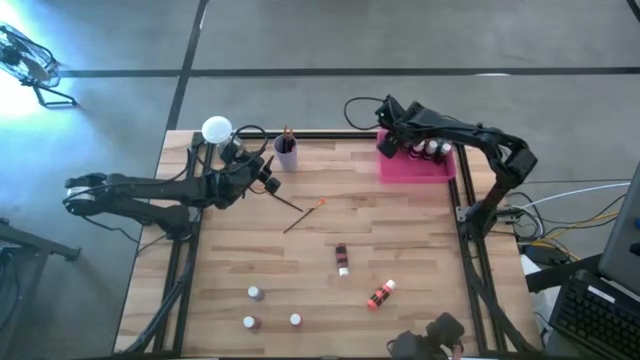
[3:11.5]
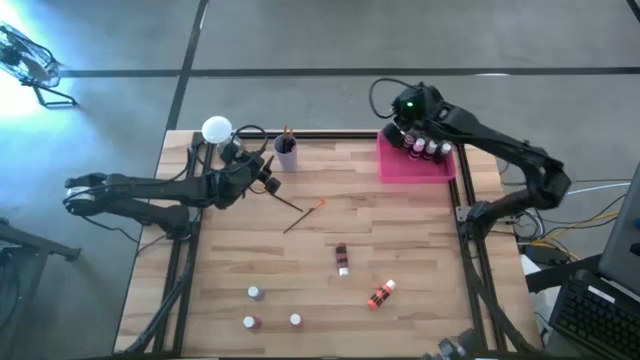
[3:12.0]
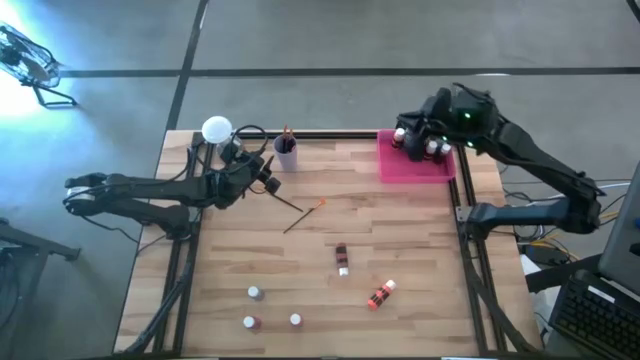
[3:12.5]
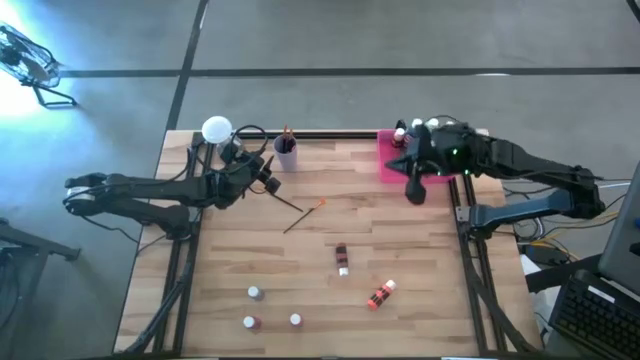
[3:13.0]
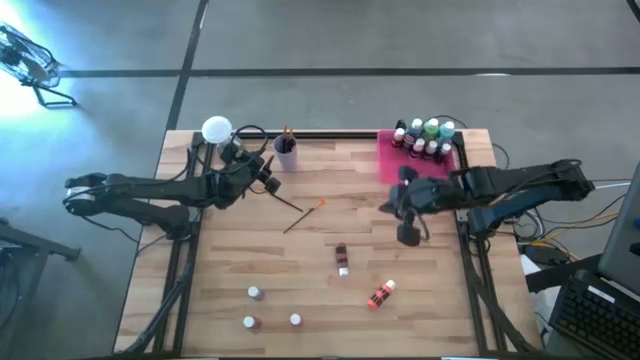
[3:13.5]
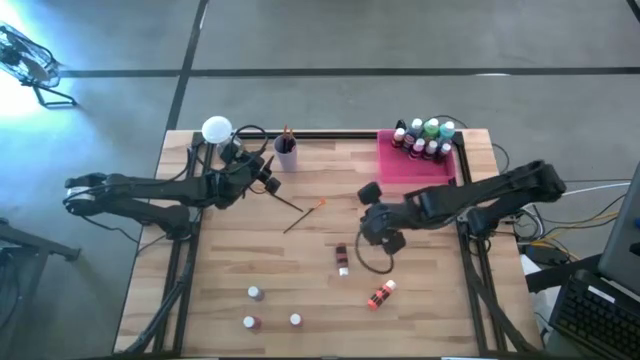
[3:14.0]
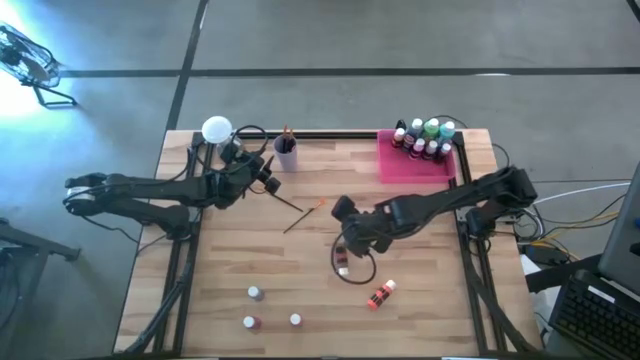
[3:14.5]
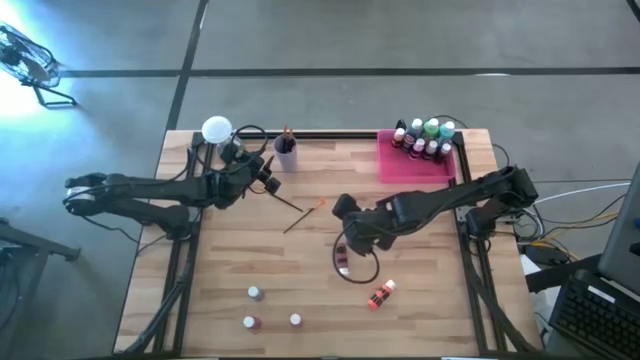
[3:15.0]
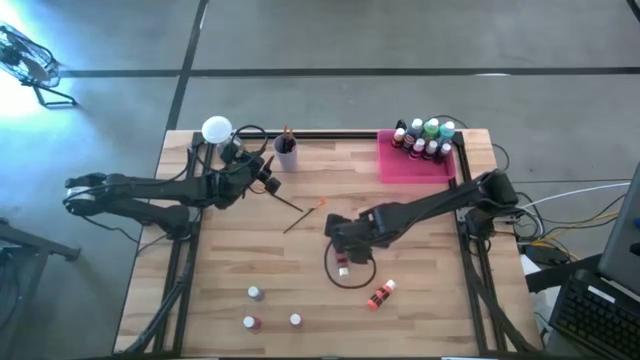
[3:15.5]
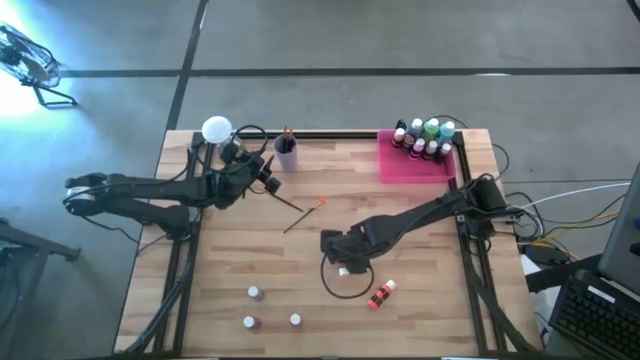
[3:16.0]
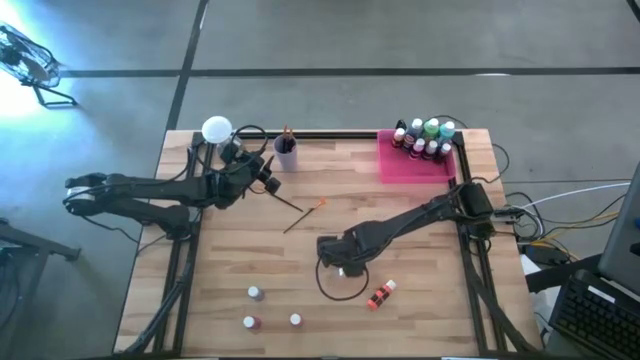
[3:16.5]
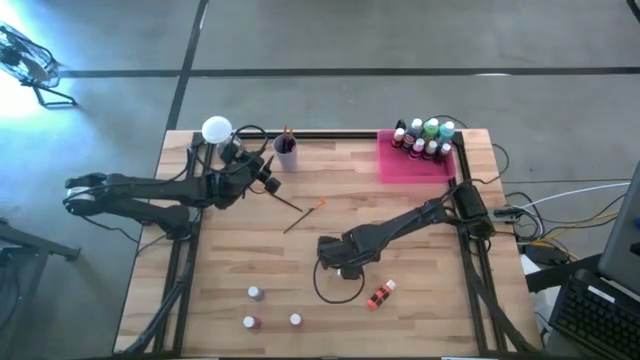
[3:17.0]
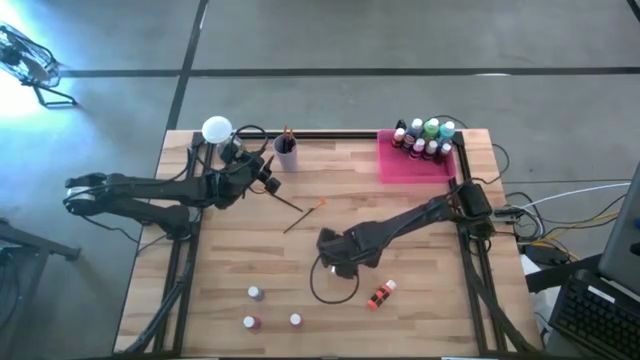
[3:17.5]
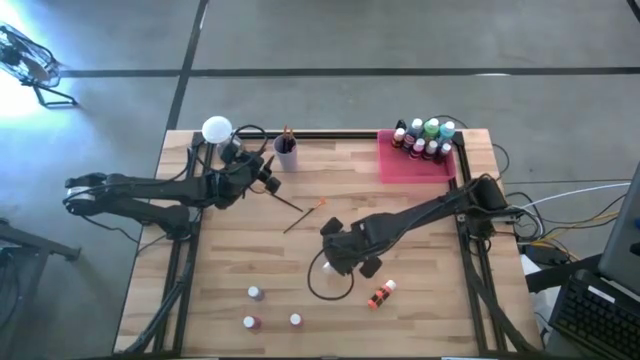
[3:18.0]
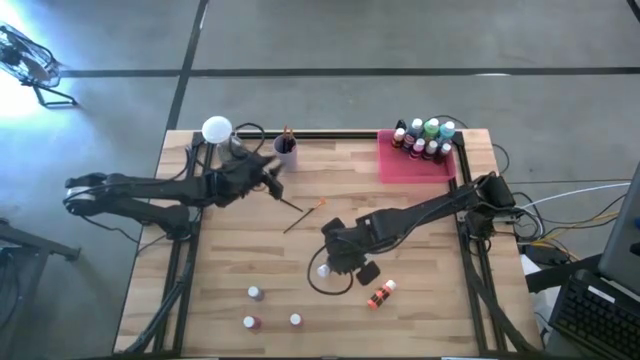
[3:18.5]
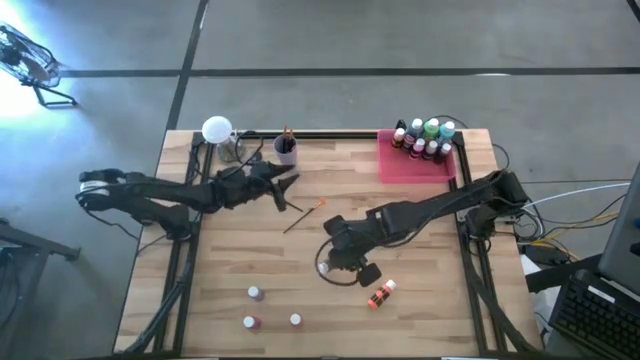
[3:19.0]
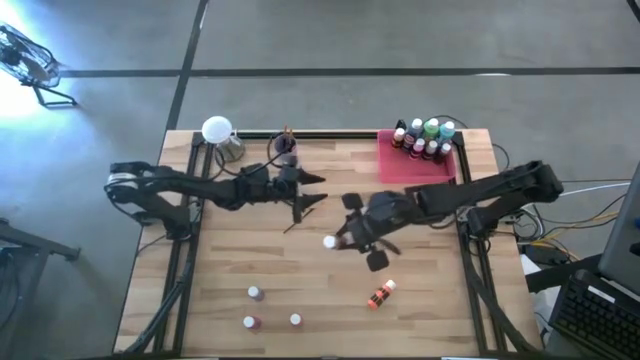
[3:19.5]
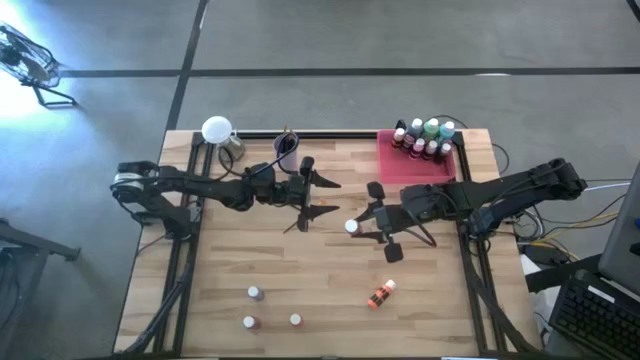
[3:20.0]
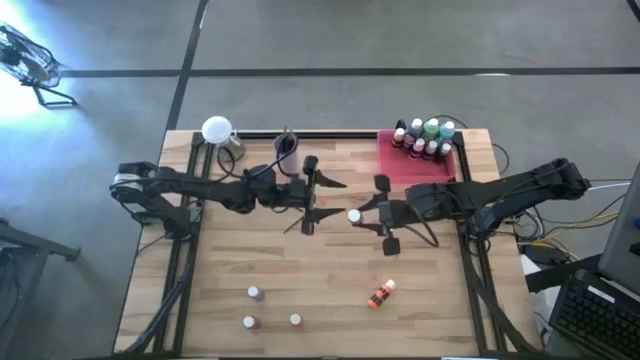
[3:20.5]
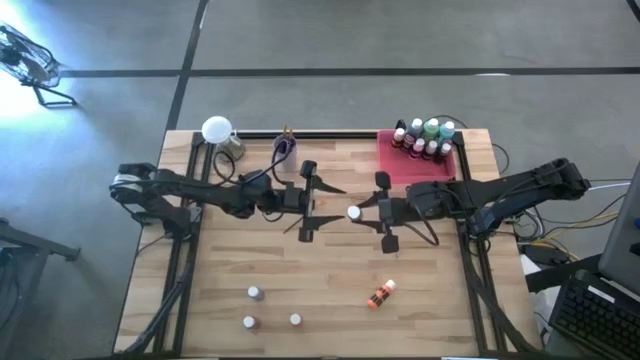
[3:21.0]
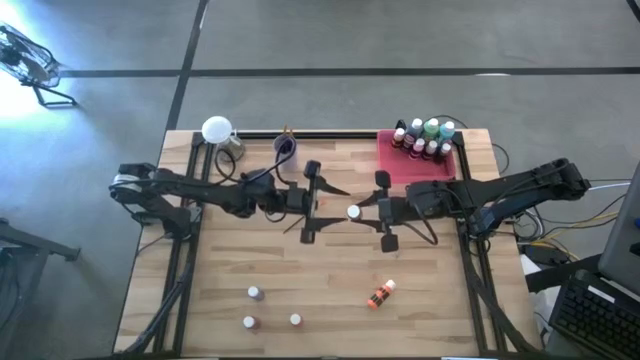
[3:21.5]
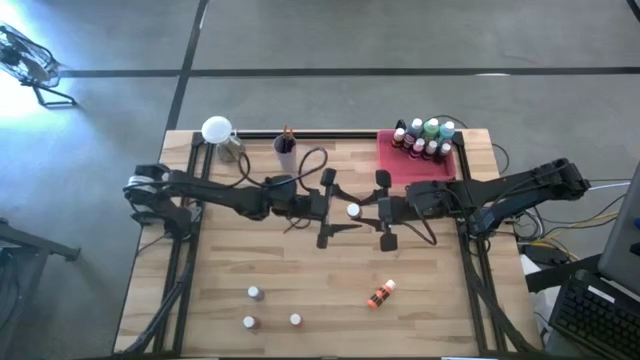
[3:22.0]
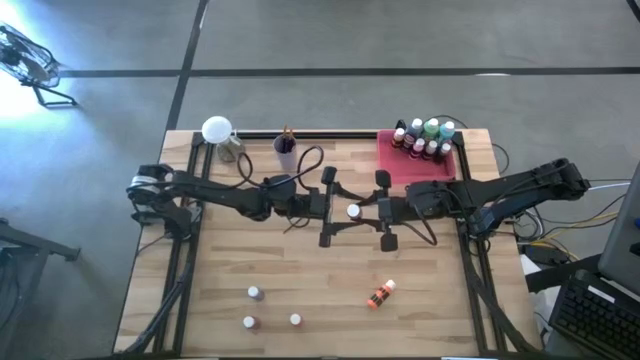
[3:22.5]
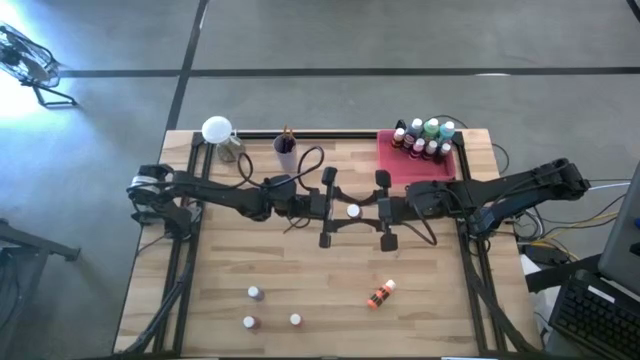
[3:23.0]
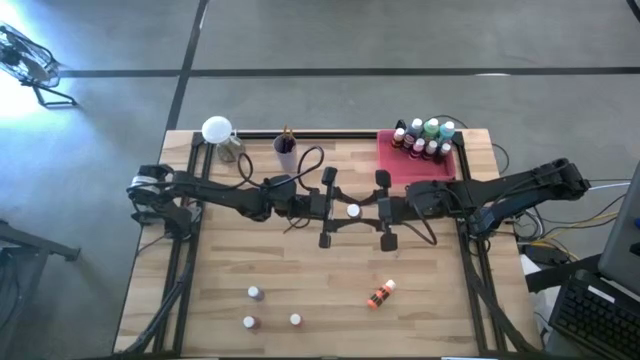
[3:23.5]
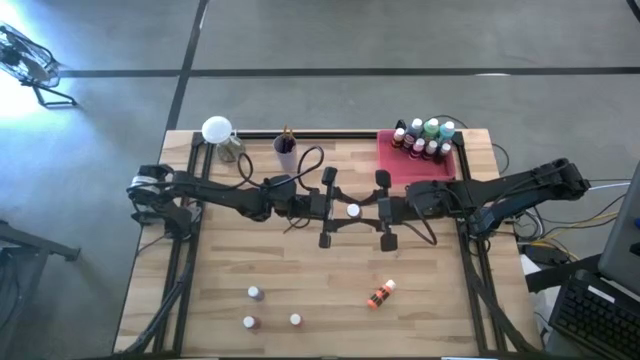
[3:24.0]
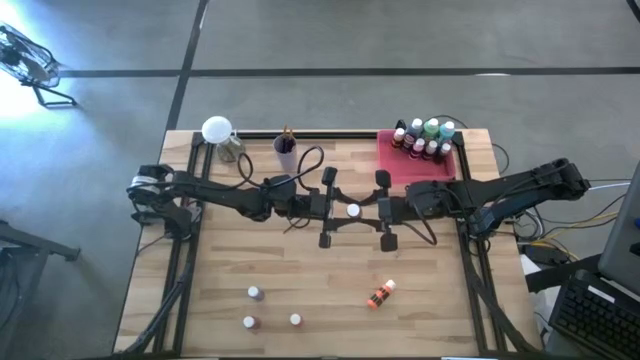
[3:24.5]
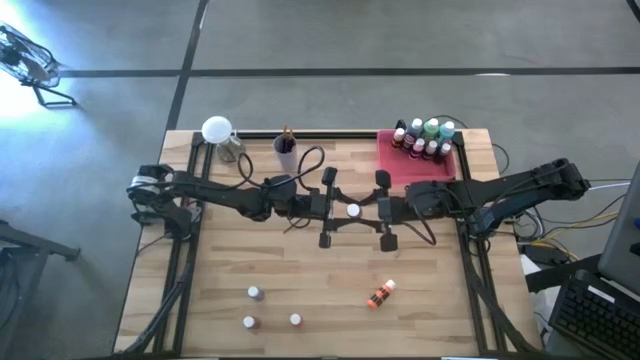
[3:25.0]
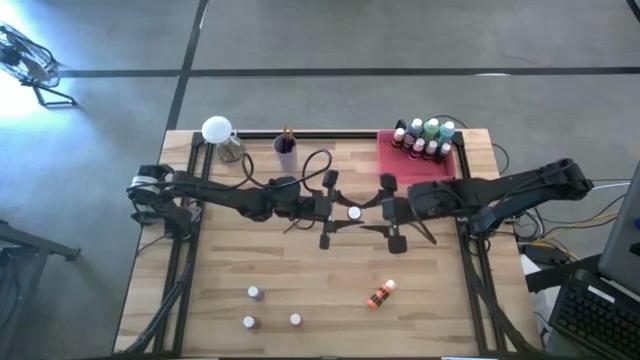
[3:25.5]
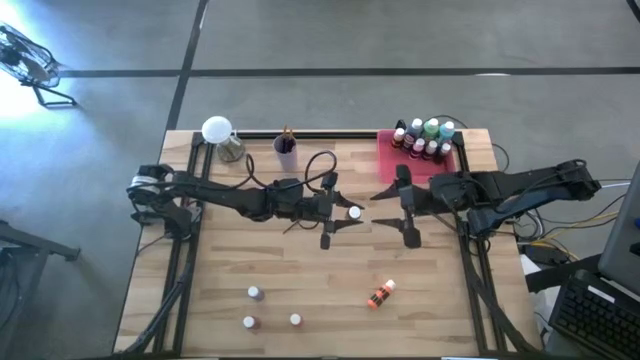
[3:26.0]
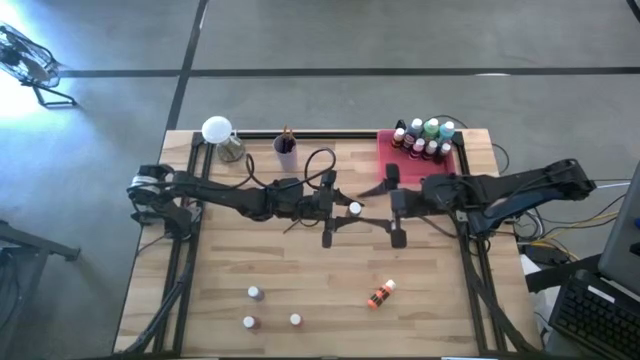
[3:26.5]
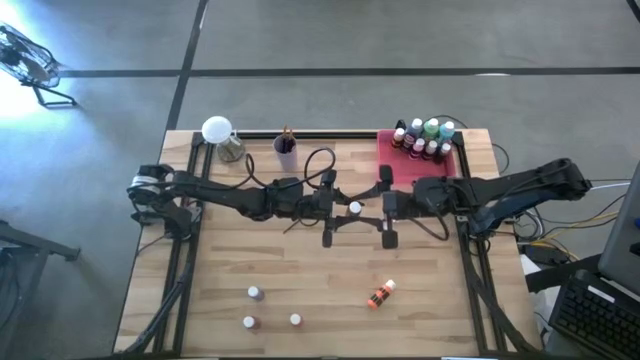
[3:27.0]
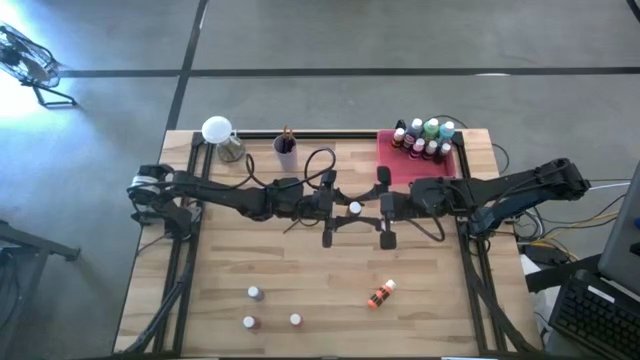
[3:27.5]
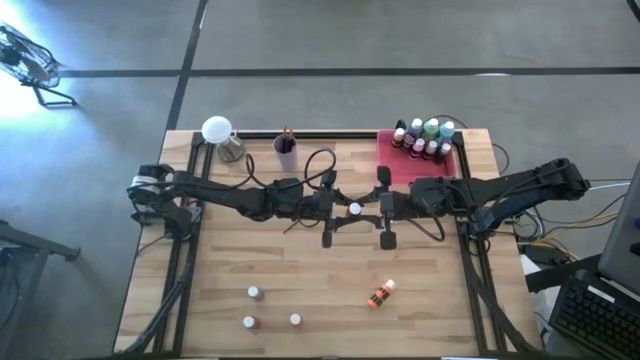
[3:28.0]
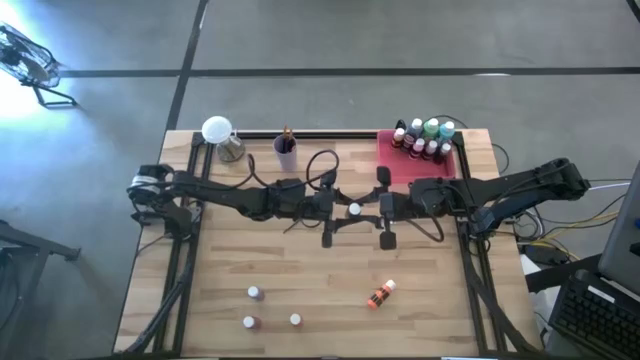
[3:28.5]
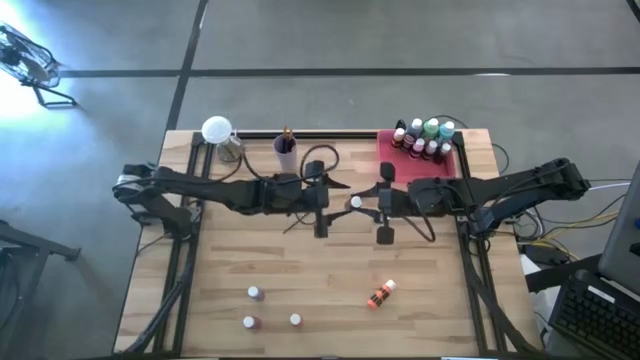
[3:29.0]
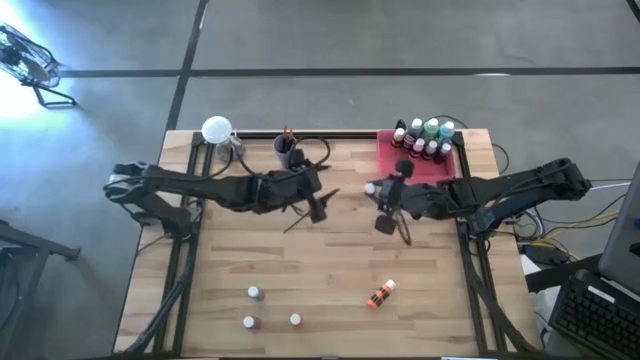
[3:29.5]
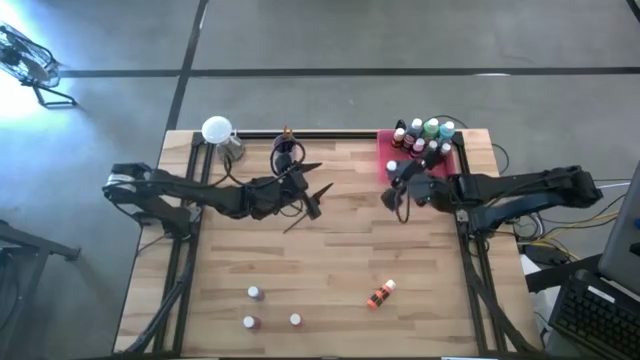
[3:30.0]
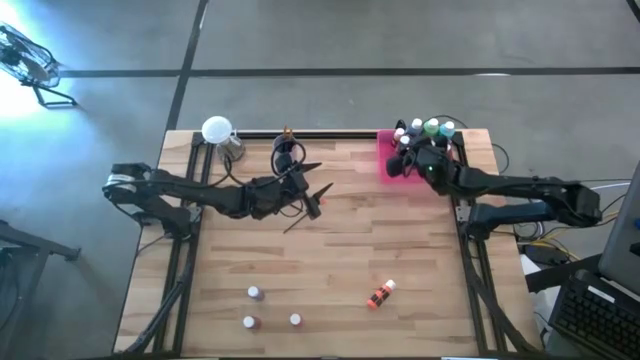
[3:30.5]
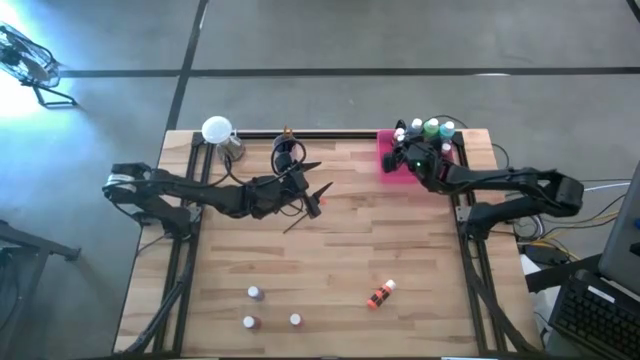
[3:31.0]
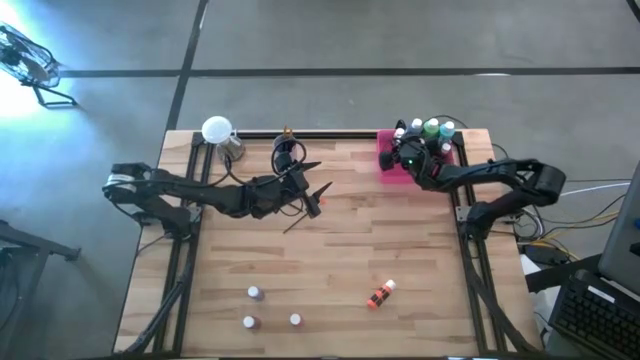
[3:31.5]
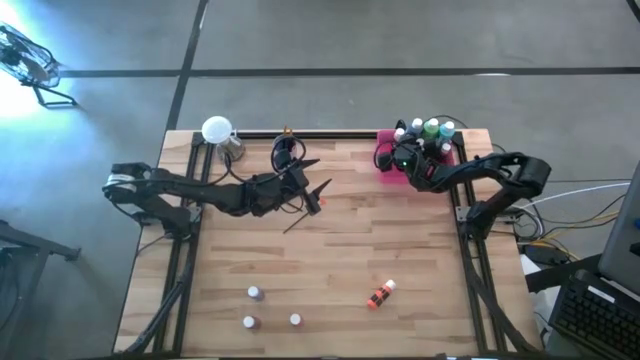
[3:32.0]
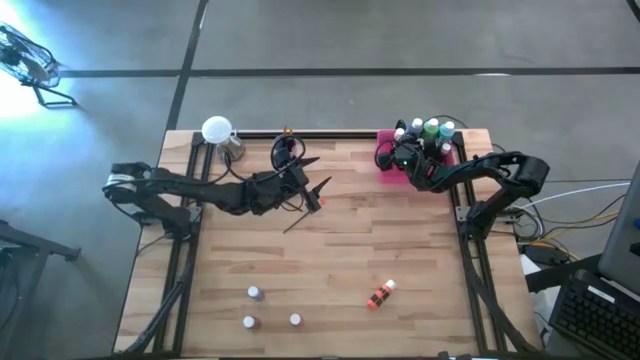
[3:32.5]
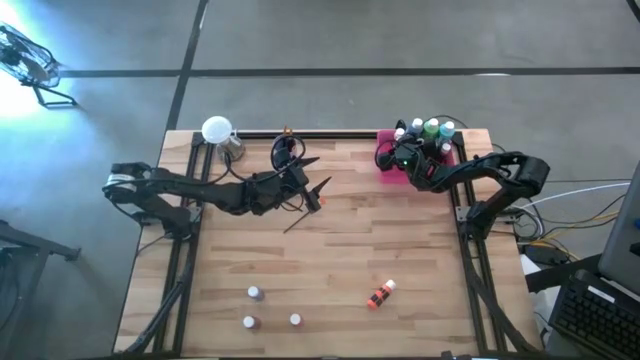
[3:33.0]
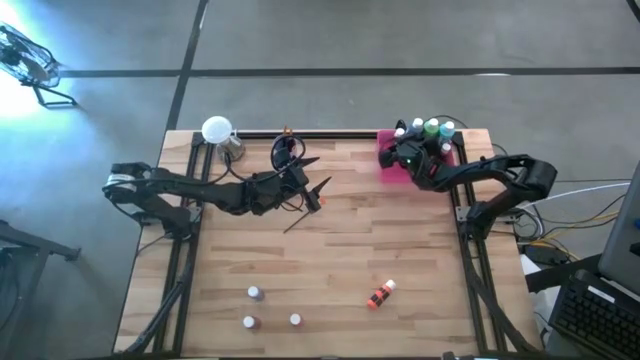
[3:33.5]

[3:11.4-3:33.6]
Task: Pick & Place Paint Supplies
Put the small brown paint bottle into the pink bin
